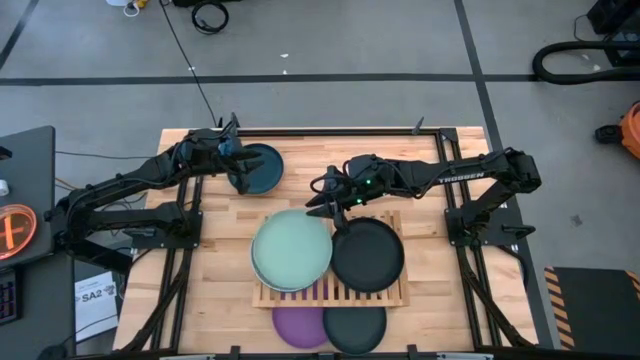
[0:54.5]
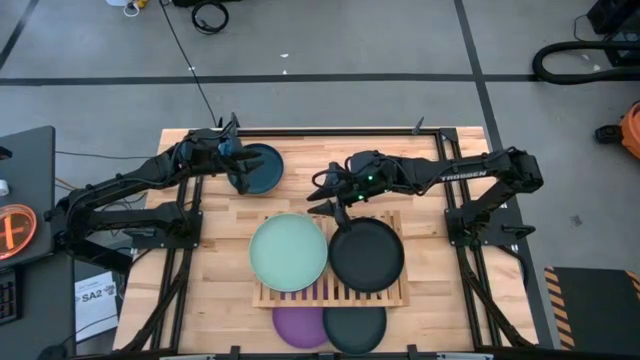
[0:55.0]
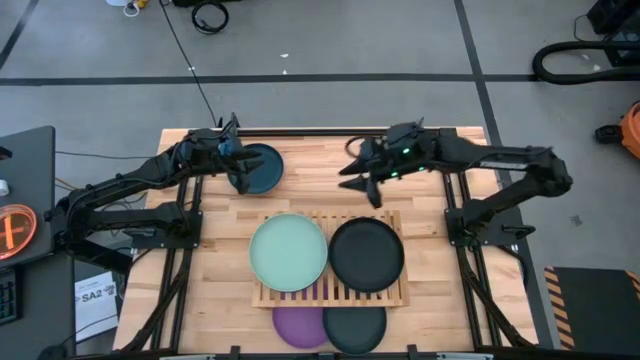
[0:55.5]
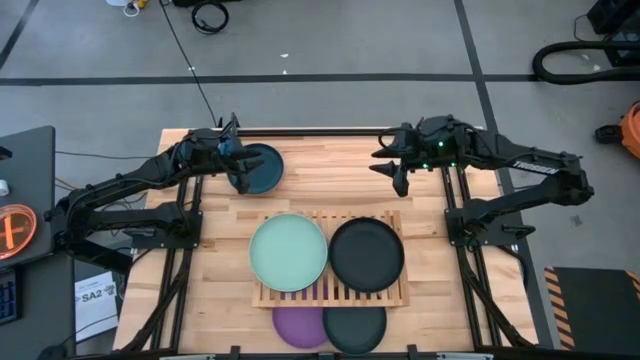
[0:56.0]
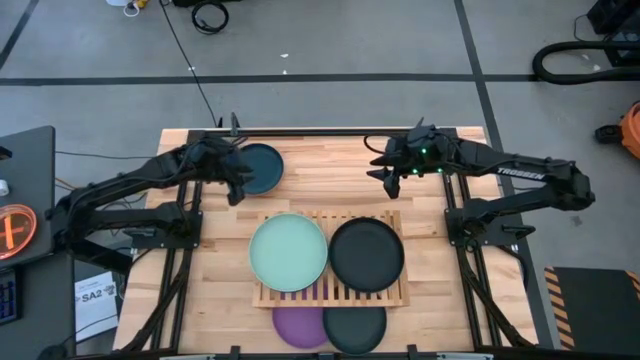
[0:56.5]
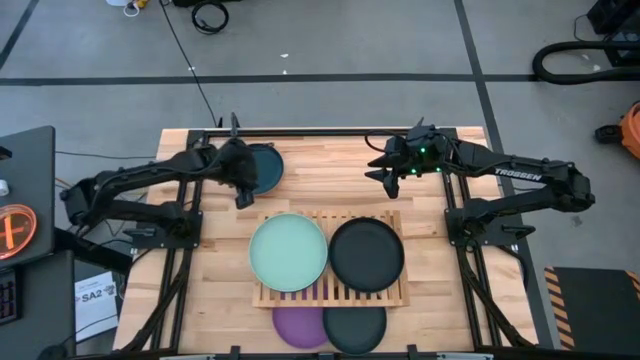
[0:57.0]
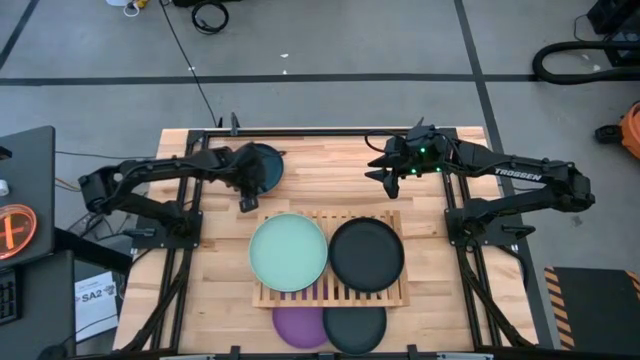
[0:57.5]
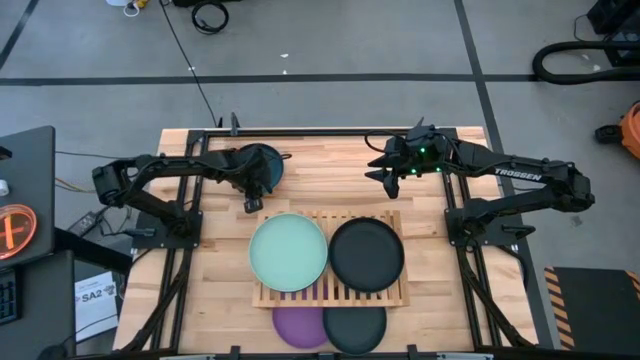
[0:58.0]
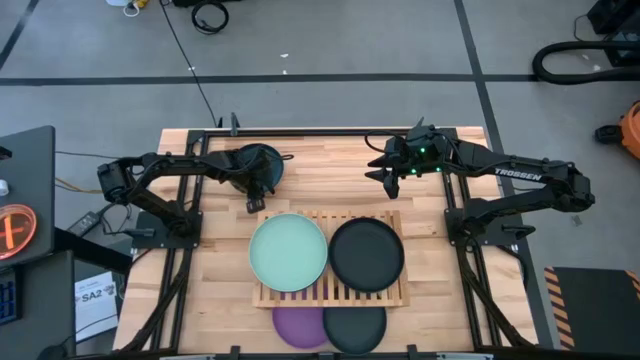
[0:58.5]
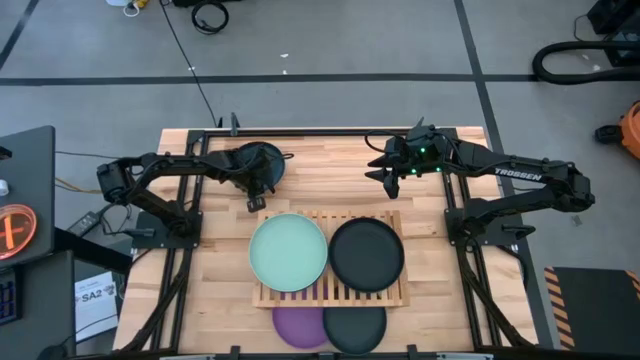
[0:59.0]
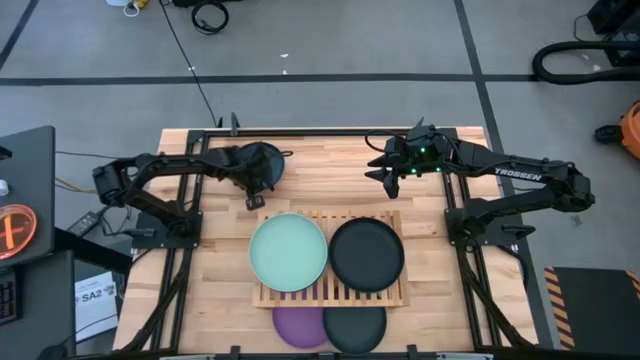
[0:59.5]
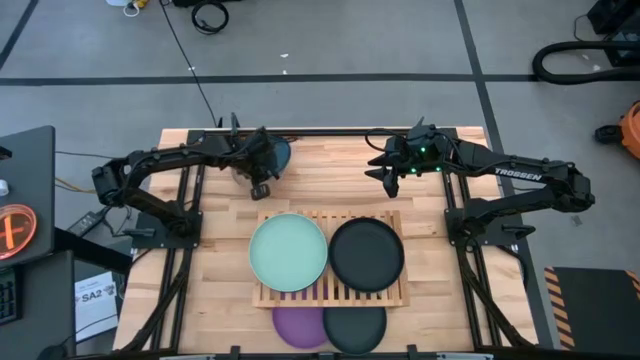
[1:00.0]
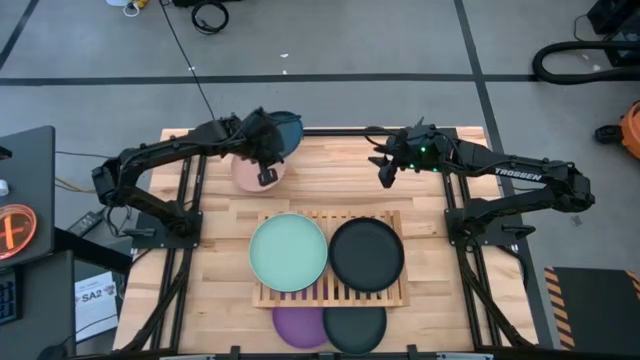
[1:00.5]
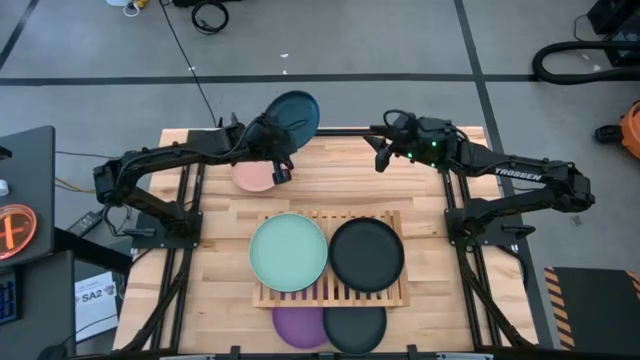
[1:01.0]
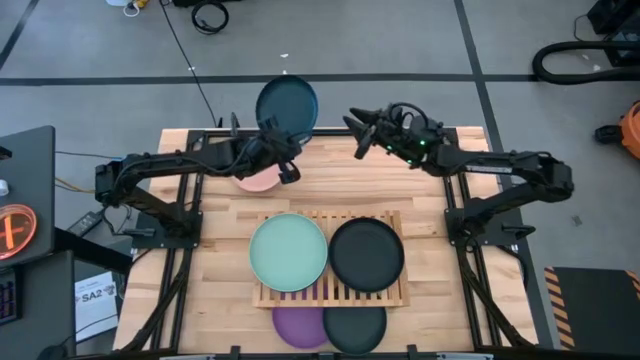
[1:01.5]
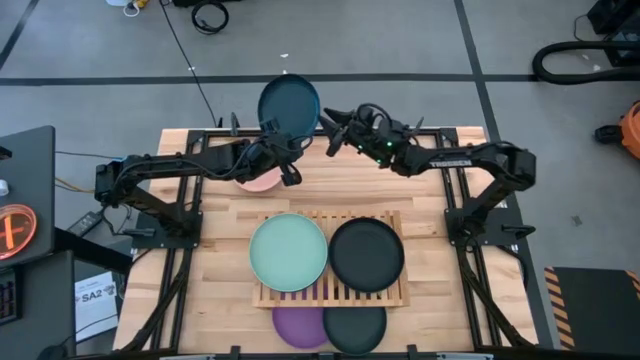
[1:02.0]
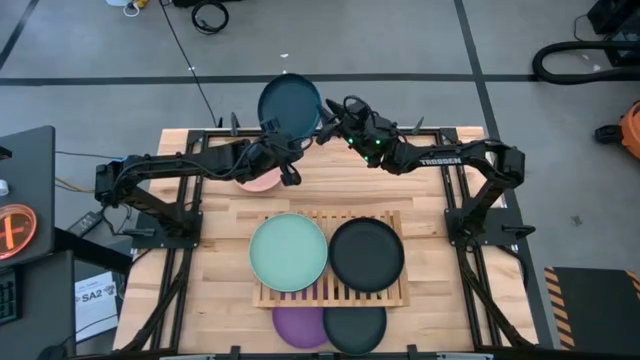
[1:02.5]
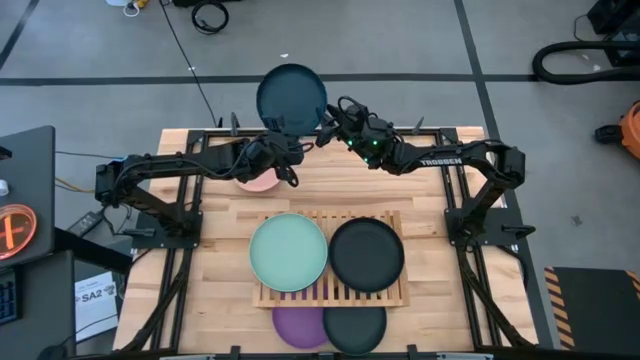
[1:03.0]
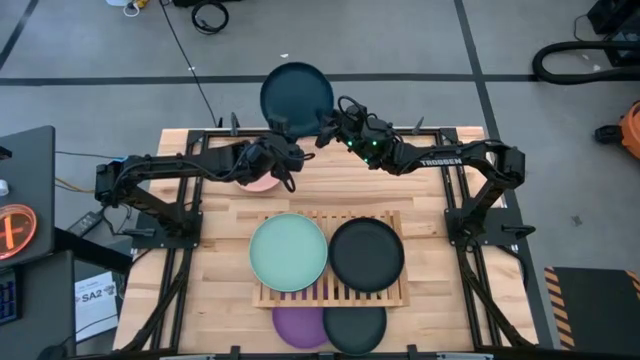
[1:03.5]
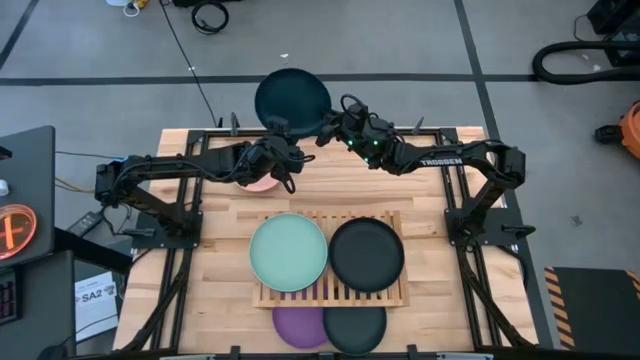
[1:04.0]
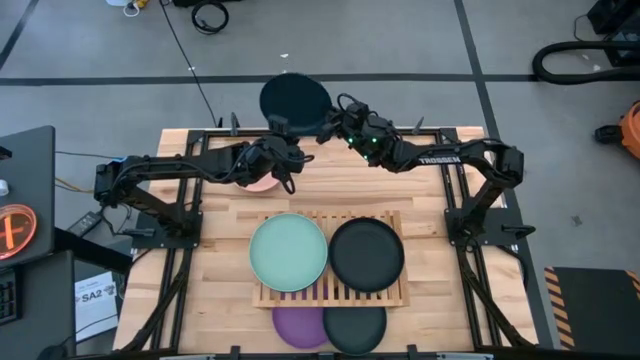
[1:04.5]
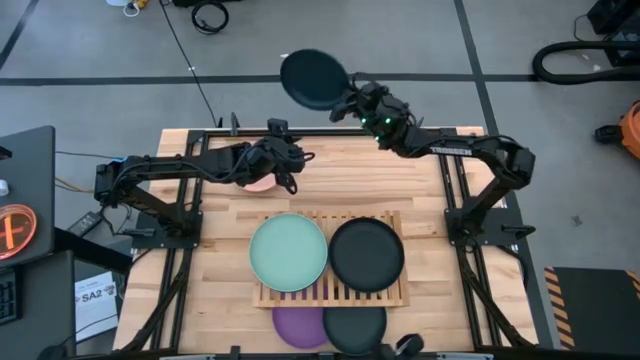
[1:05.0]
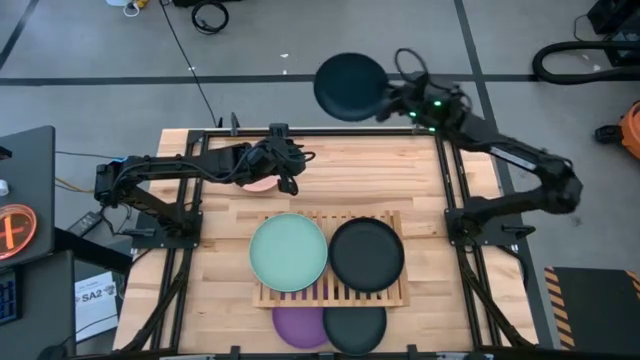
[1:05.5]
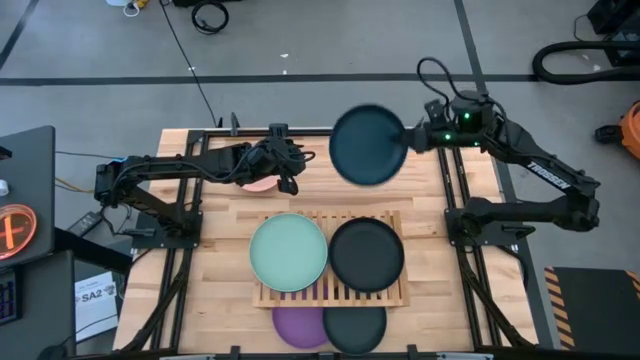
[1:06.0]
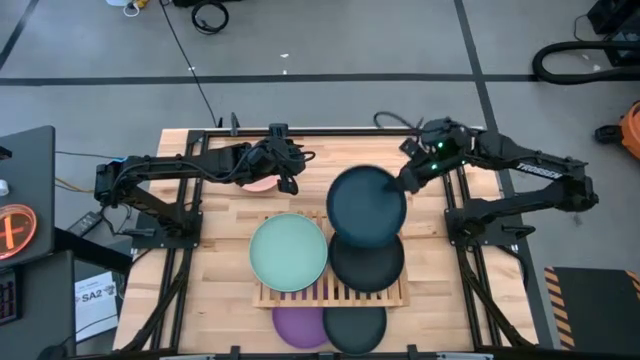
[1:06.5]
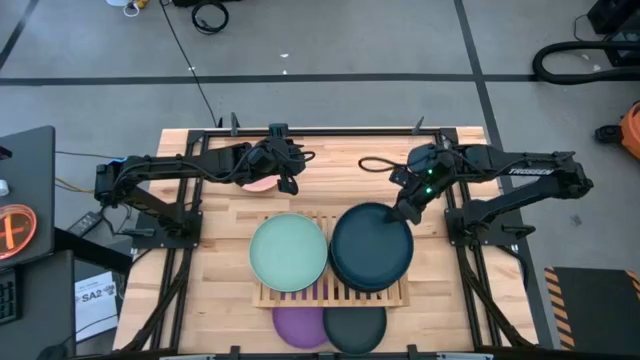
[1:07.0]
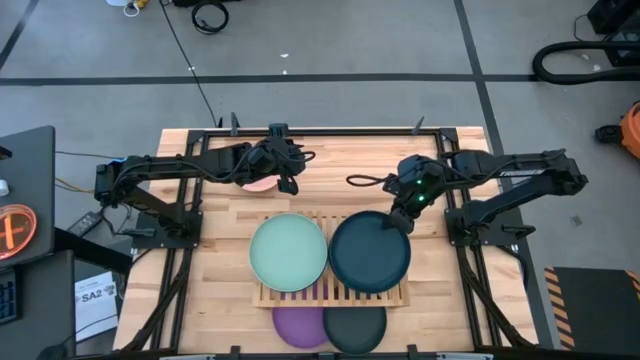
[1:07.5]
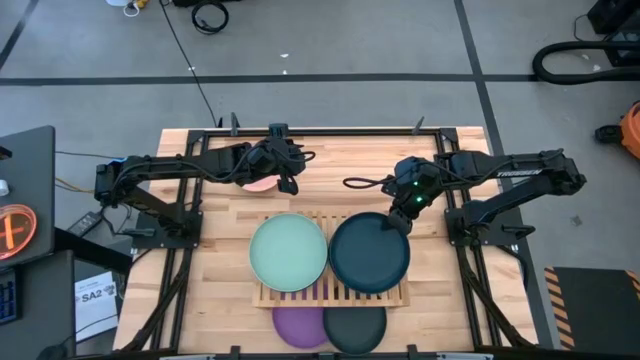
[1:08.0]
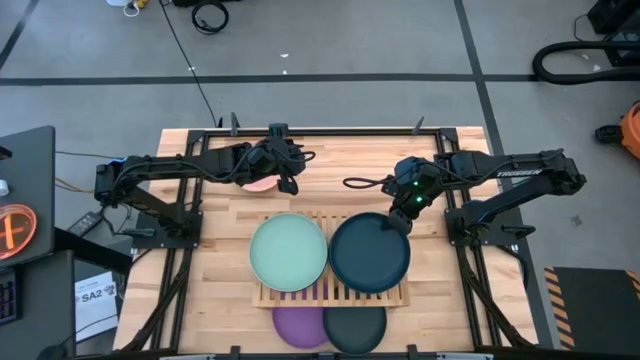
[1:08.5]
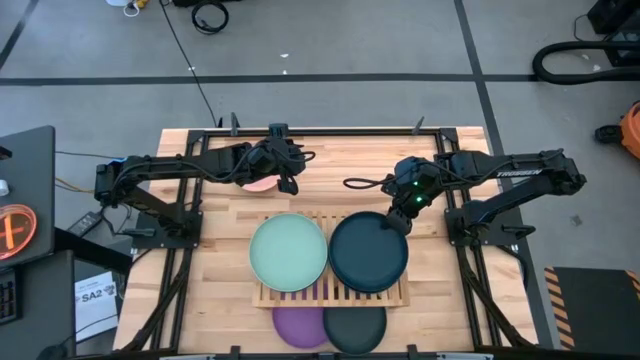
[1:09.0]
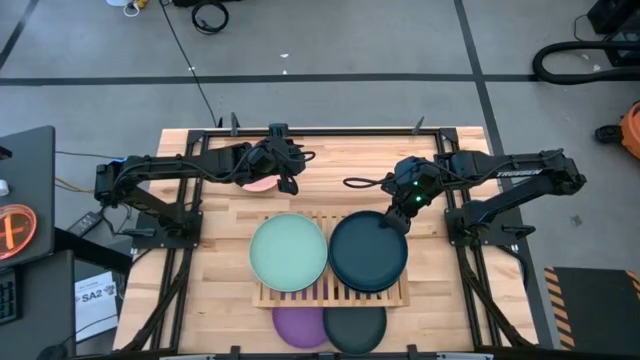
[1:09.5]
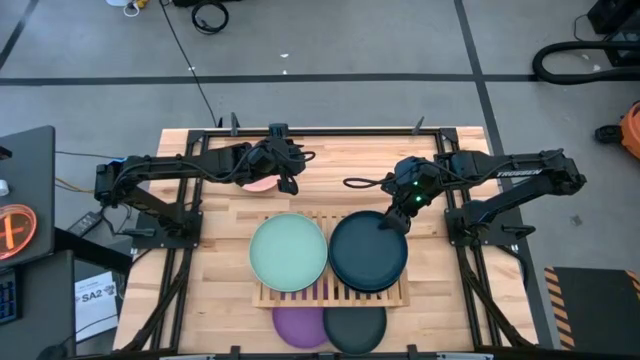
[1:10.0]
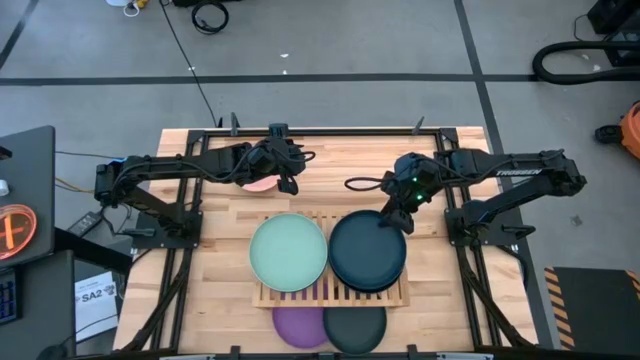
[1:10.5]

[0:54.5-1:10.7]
Task: Place and stack plates onto a shelf
Stack the dark green plate on top of the black plate on the shelf

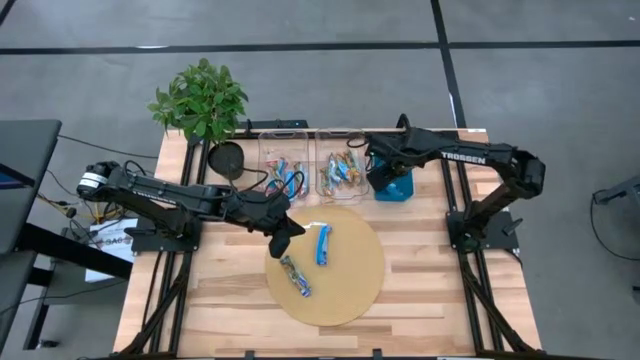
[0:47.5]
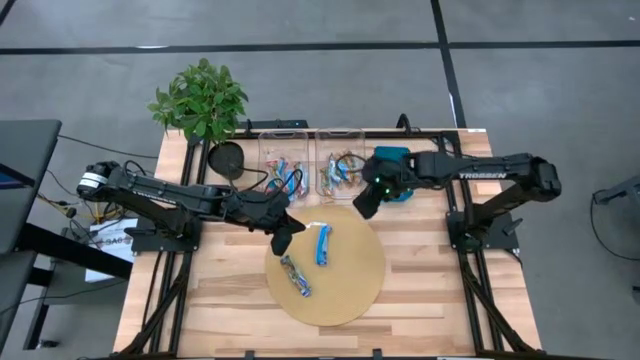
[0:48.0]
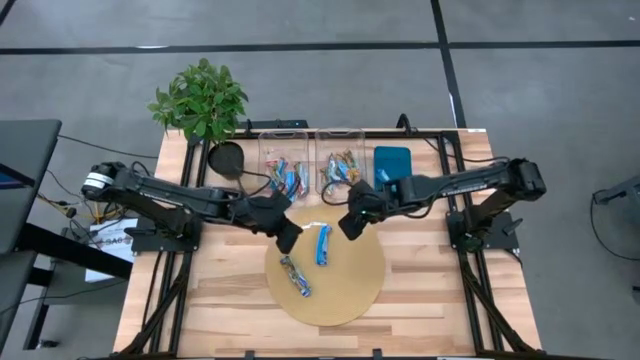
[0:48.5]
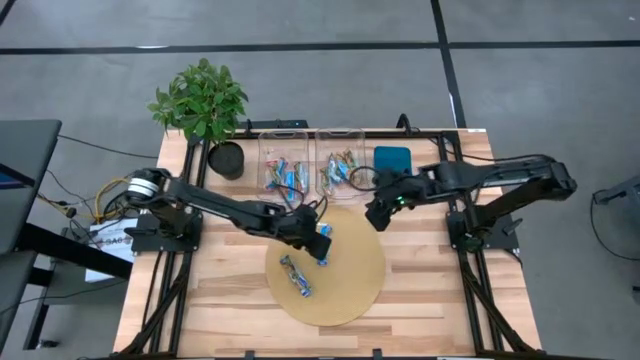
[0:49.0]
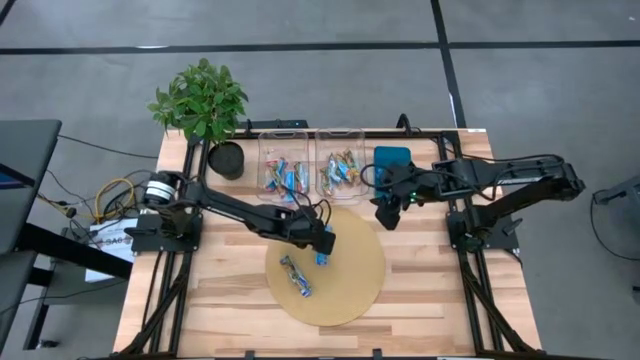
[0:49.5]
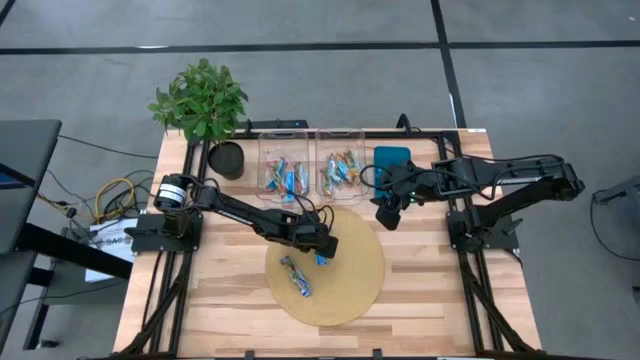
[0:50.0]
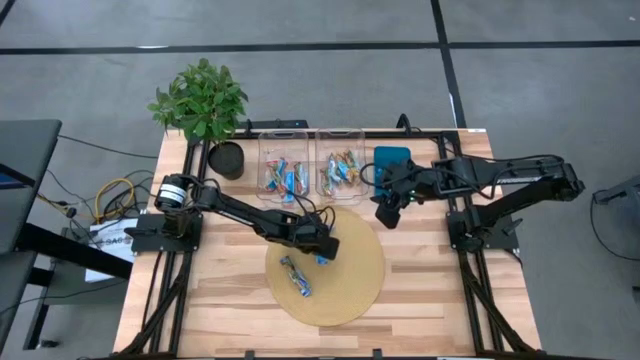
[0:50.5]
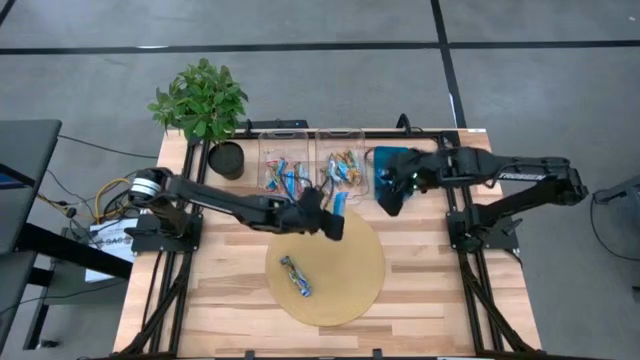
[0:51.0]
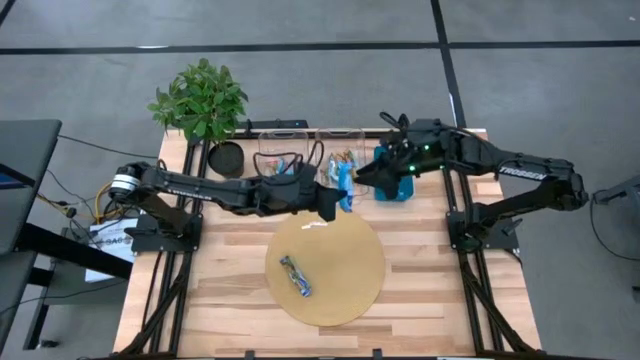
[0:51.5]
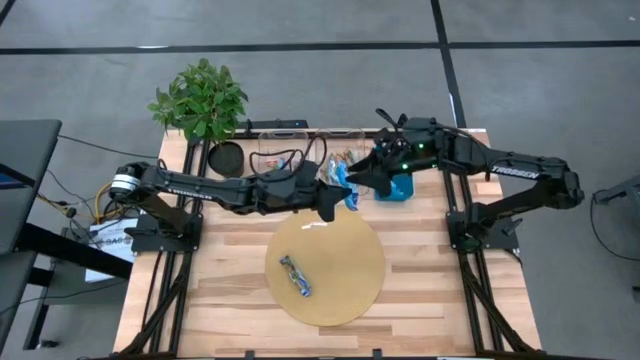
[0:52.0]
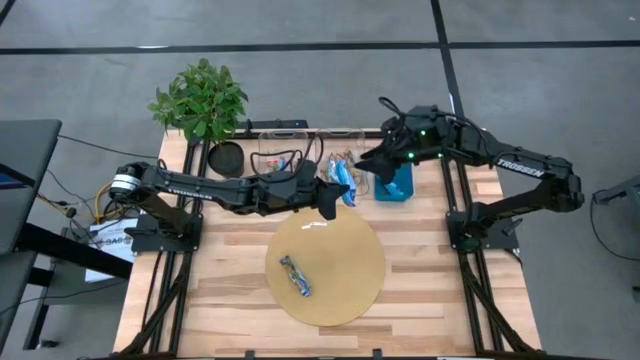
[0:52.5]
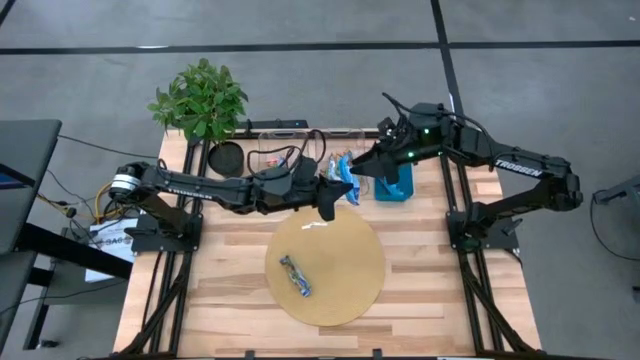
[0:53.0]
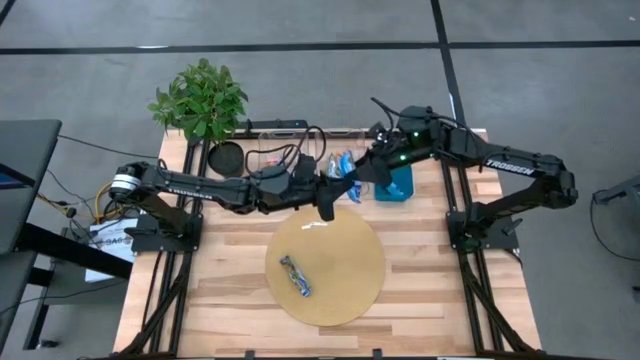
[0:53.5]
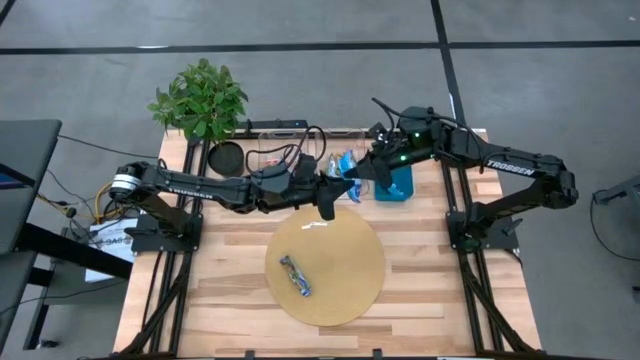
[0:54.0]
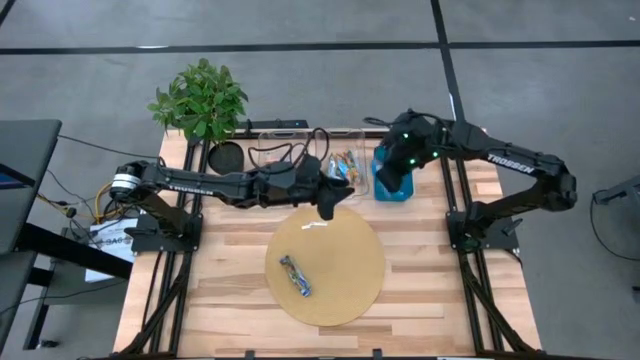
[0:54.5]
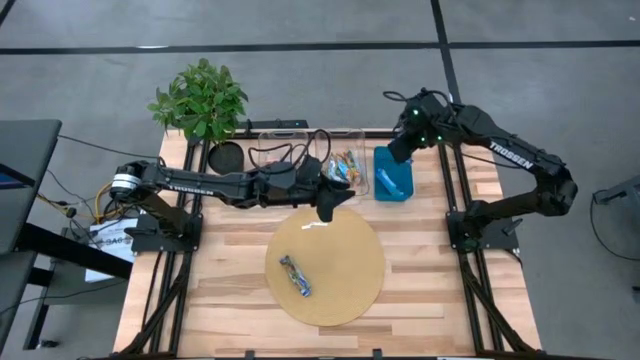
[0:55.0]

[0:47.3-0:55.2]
Task: Pick and place Granola Bars by type
Put the top blue granola bar into the blue bin
